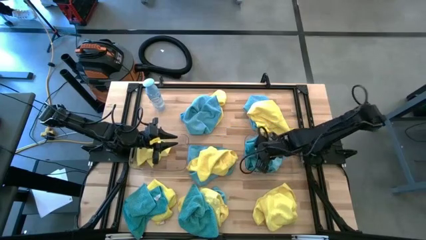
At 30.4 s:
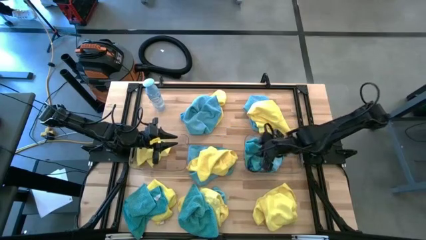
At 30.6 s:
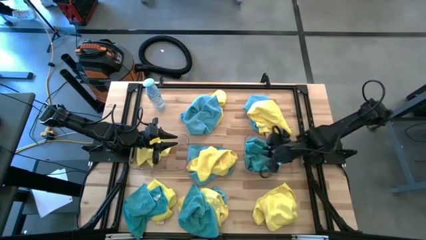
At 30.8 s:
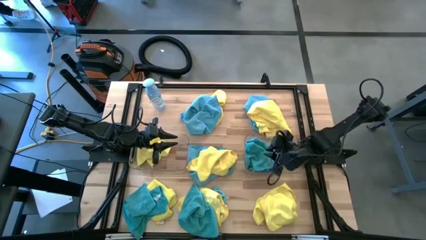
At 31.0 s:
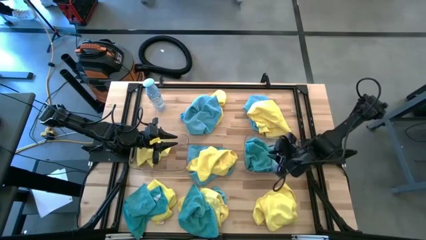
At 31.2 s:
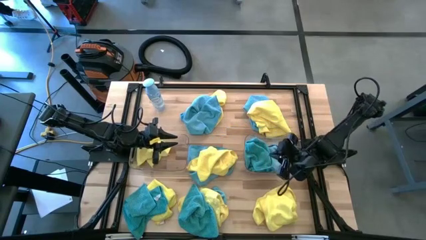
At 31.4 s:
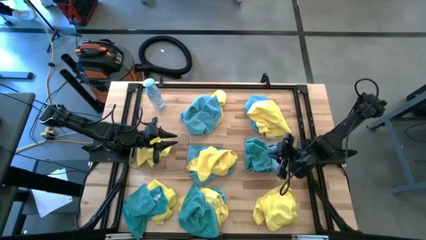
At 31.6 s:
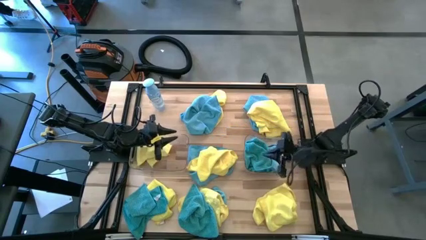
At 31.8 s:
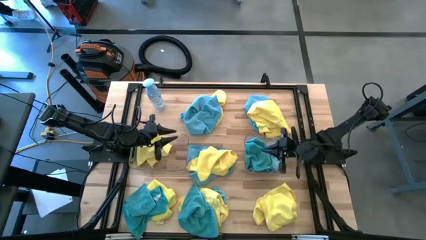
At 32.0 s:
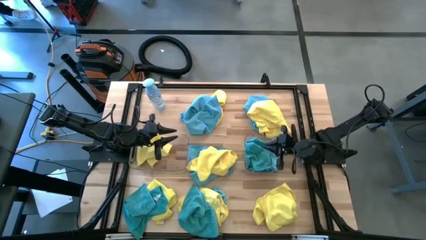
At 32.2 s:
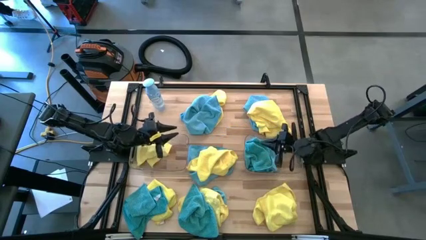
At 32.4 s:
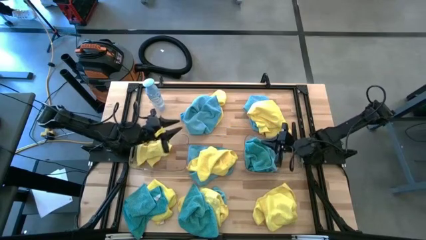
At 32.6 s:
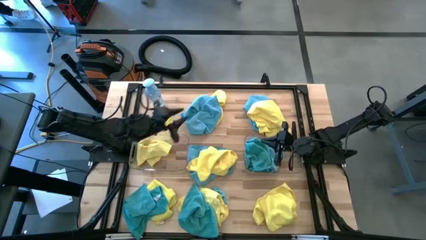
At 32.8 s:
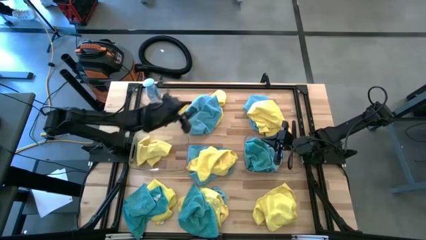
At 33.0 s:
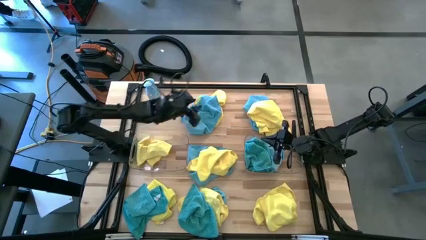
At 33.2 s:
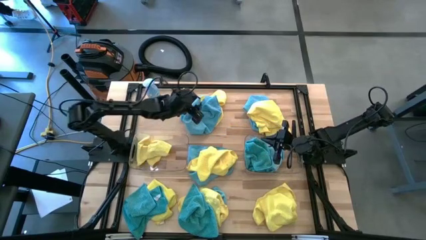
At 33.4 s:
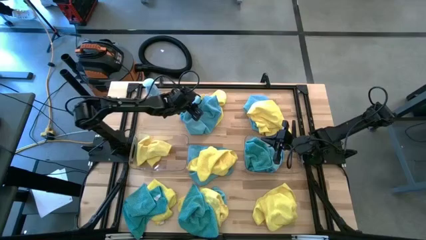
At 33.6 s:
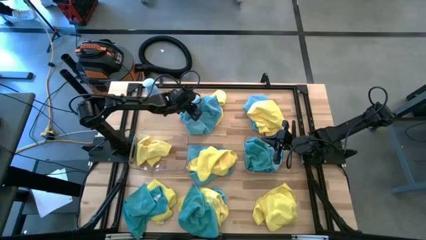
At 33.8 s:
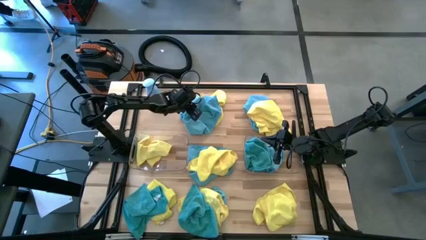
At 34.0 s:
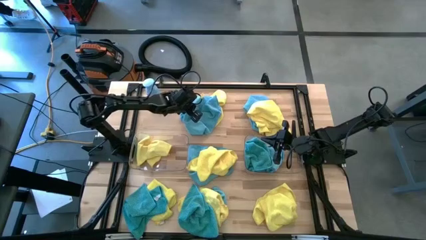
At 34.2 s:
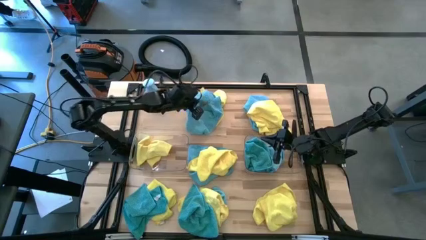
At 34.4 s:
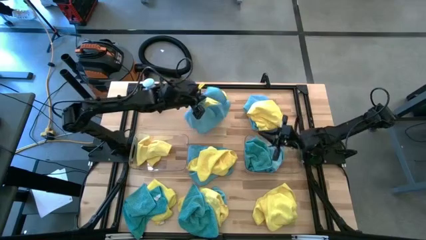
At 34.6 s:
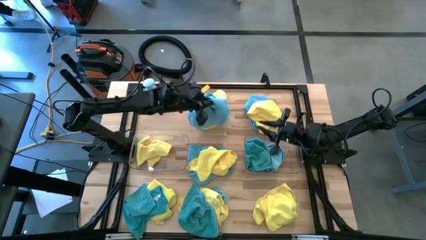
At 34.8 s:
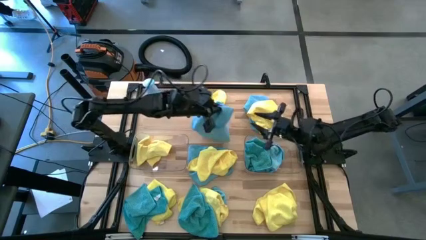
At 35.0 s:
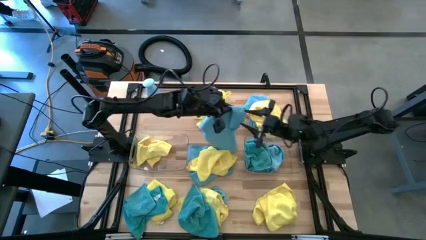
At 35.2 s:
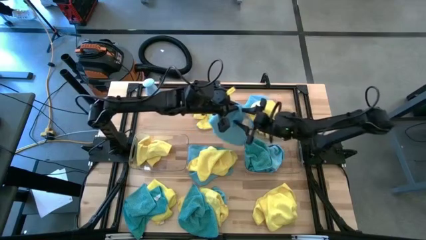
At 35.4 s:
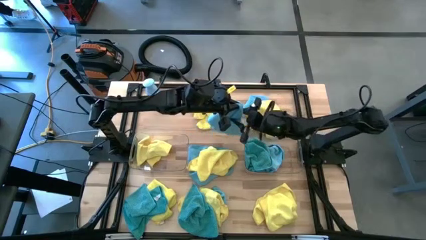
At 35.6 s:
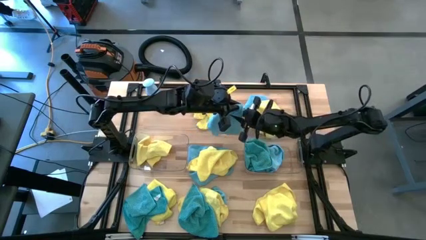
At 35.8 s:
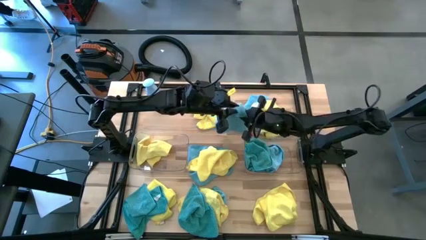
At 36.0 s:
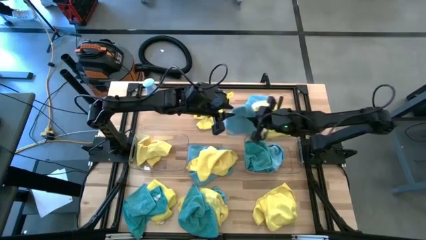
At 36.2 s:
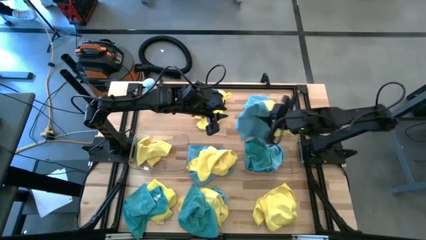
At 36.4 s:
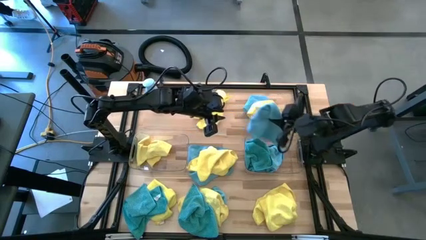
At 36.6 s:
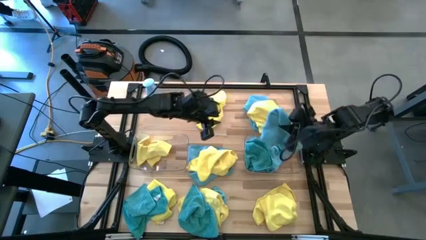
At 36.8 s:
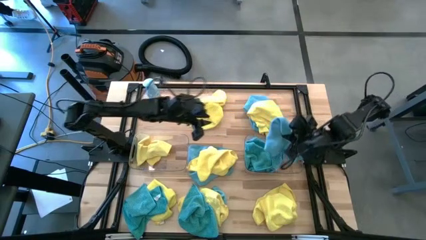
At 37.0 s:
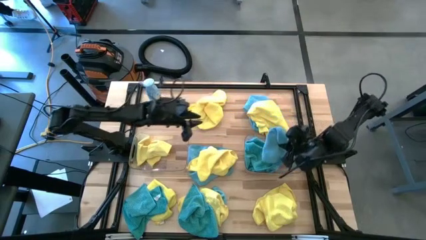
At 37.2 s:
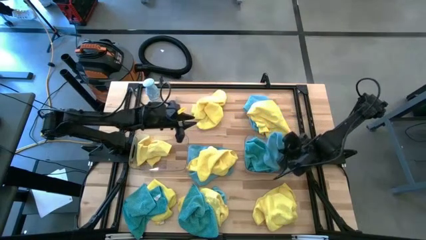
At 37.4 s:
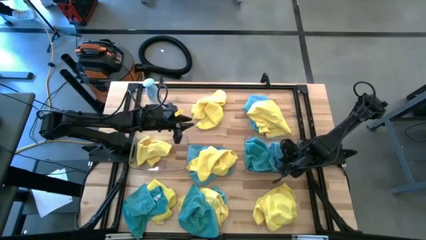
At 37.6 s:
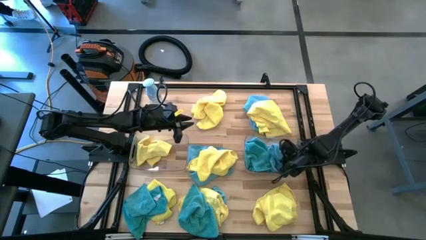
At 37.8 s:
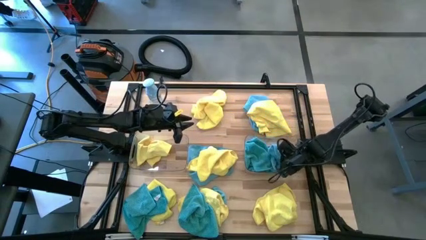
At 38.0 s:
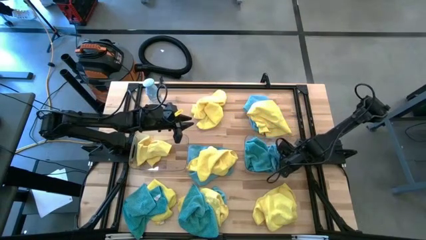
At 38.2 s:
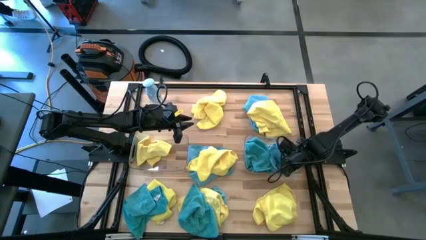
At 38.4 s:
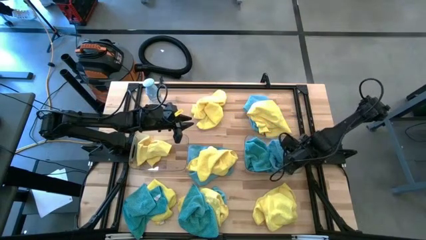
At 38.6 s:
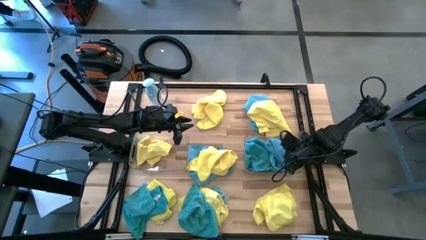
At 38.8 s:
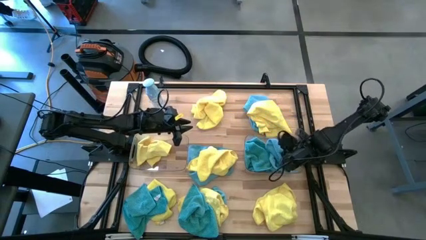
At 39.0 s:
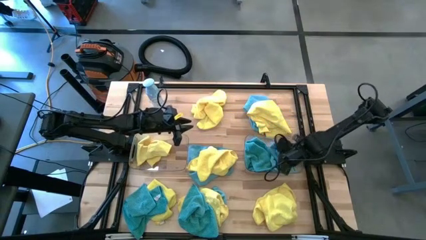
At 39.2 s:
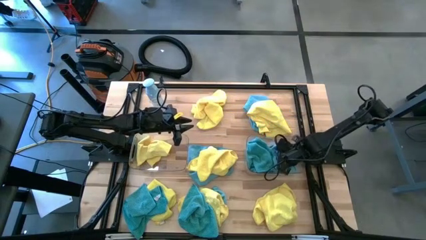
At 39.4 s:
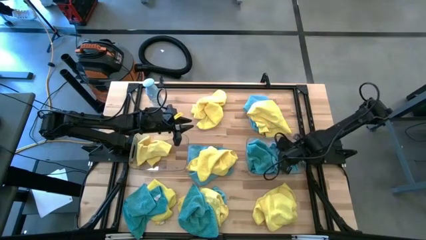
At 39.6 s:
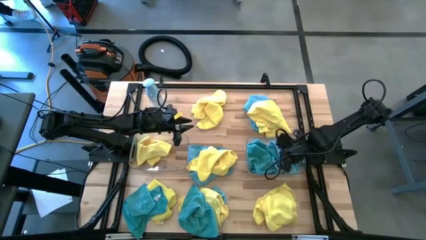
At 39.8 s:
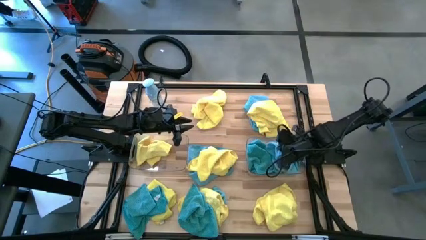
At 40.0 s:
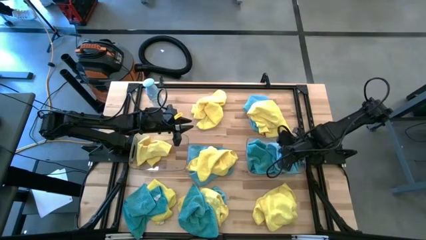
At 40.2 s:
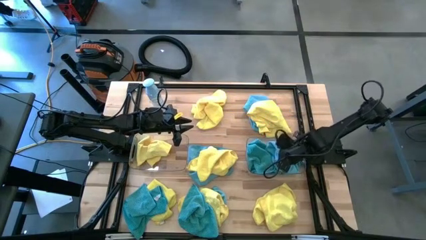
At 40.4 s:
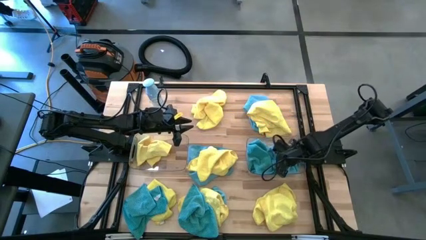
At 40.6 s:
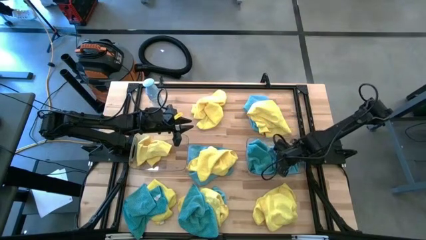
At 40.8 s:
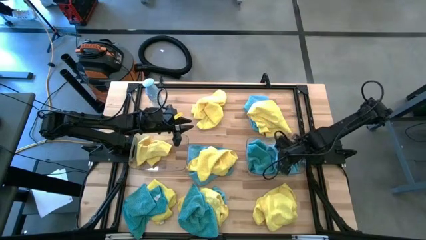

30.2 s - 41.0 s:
Task: Sort microfiber towel by color & place in baskets
Put the blue microfiber cloth into the right transparent bin

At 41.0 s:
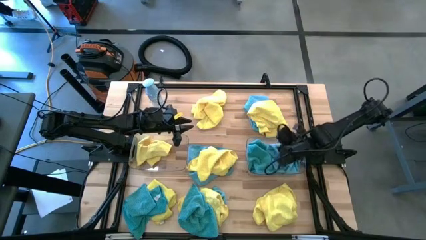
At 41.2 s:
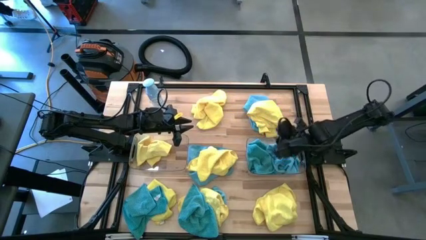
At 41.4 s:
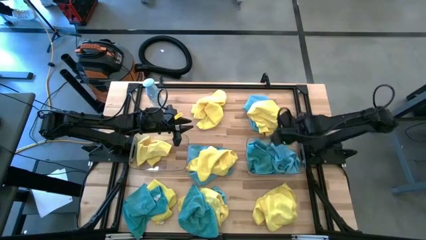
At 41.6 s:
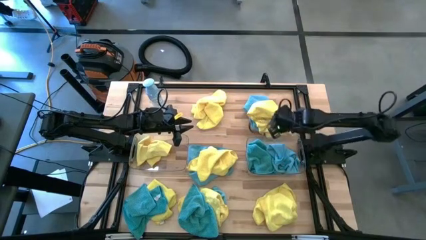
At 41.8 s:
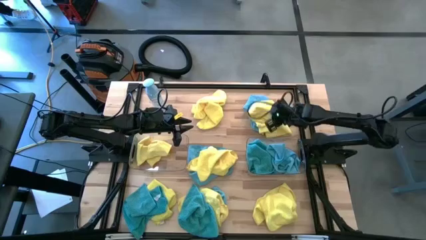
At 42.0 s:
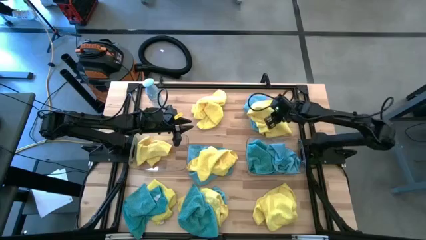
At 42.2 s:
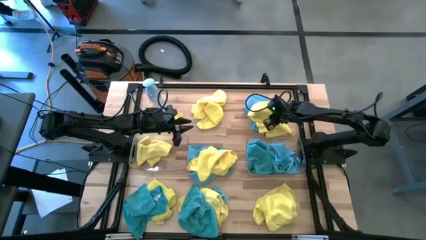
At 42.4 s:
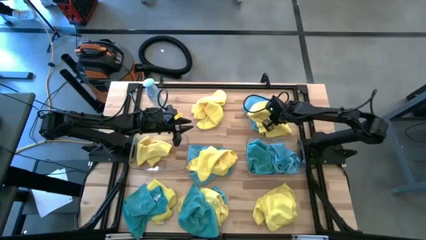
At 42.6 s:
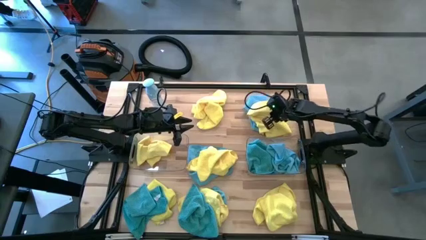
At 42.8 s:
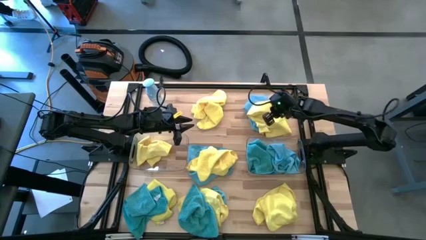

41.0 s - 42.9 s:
Put the yellow microfiber cloth into the left transparent bin
